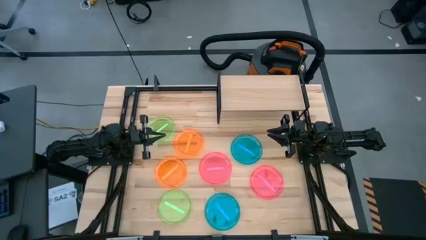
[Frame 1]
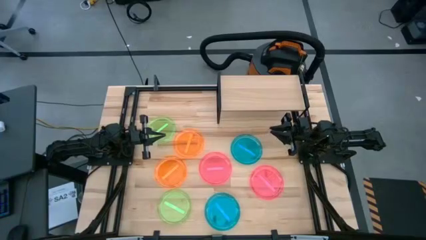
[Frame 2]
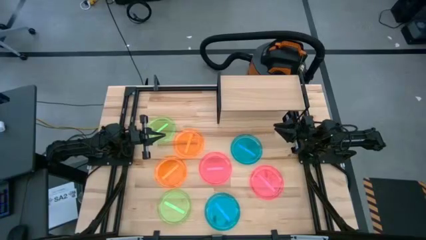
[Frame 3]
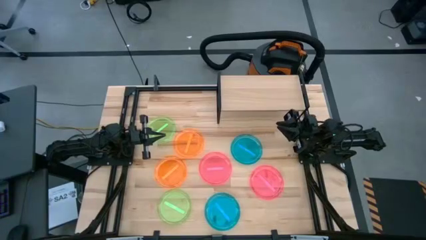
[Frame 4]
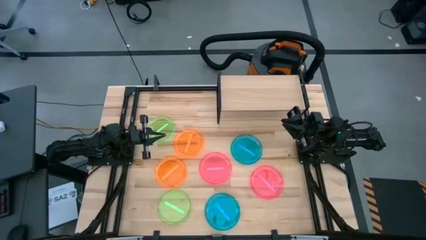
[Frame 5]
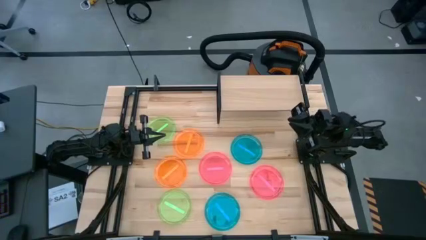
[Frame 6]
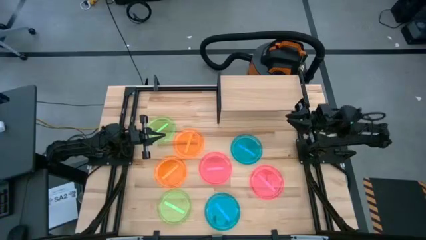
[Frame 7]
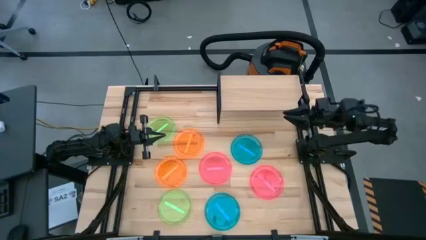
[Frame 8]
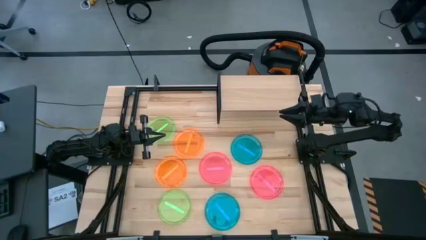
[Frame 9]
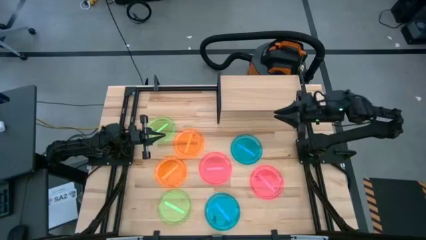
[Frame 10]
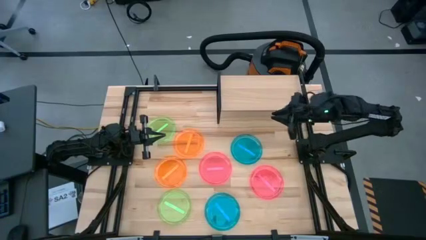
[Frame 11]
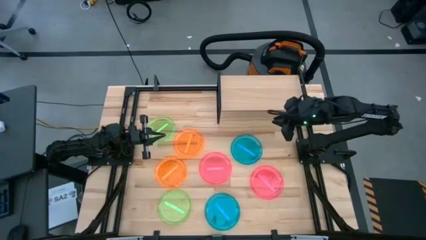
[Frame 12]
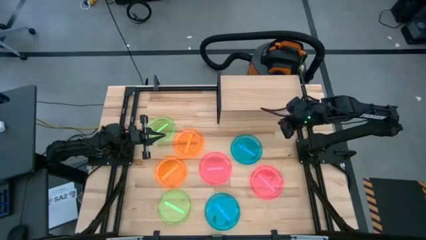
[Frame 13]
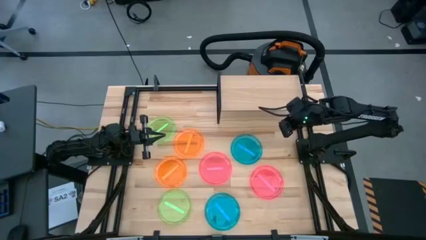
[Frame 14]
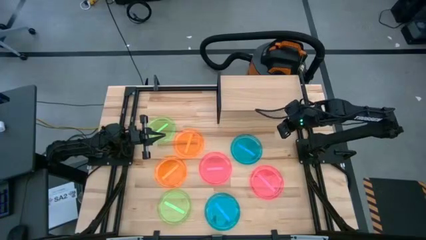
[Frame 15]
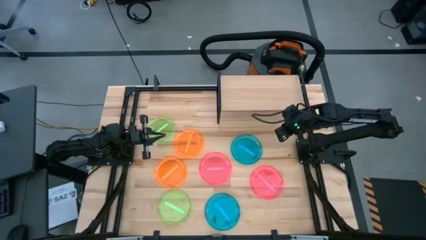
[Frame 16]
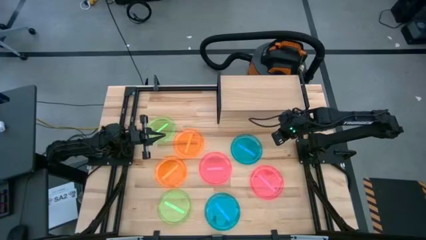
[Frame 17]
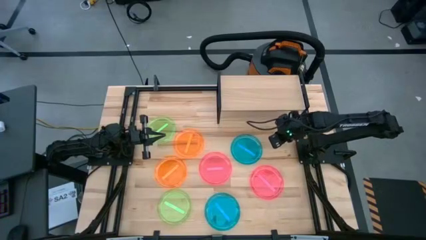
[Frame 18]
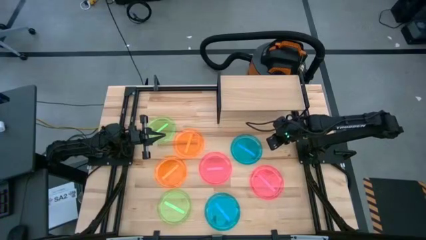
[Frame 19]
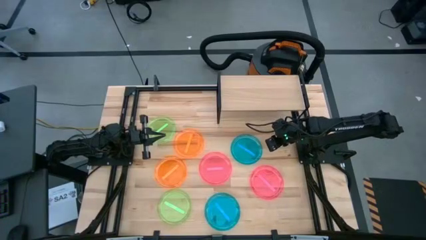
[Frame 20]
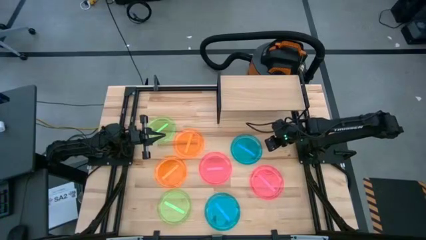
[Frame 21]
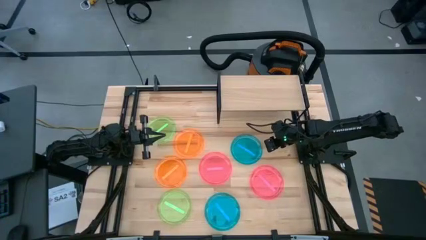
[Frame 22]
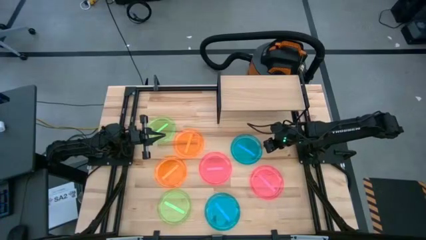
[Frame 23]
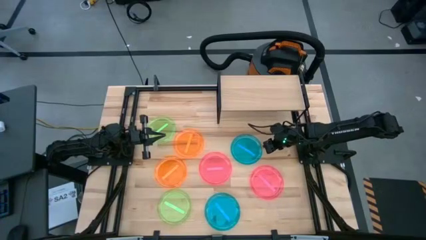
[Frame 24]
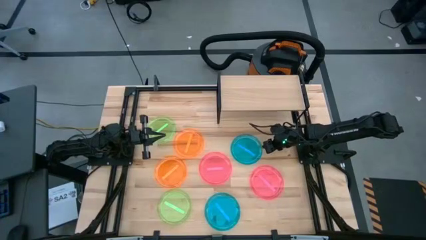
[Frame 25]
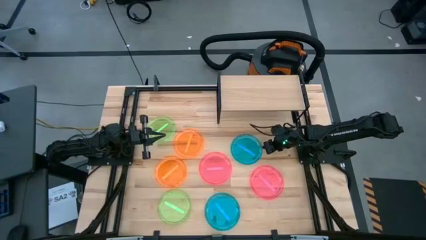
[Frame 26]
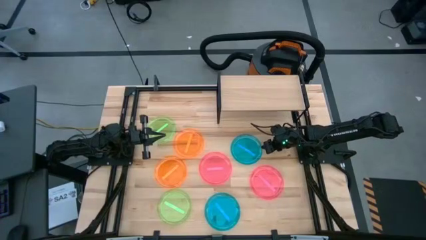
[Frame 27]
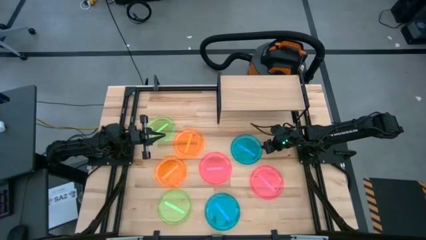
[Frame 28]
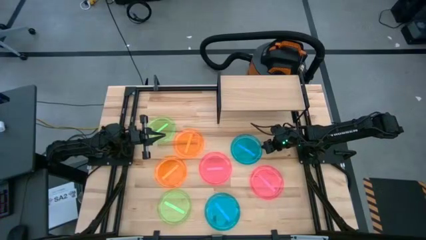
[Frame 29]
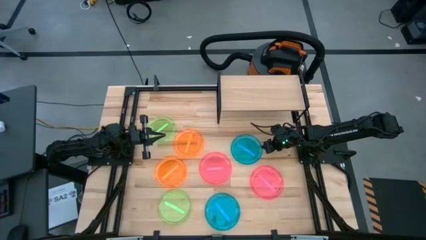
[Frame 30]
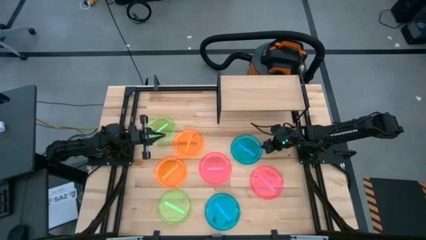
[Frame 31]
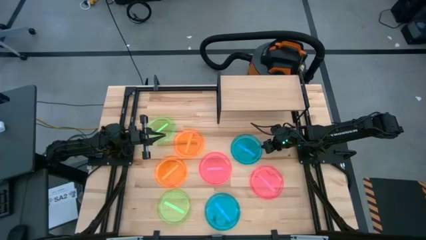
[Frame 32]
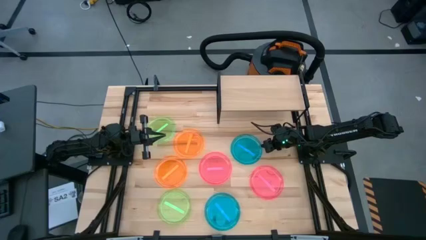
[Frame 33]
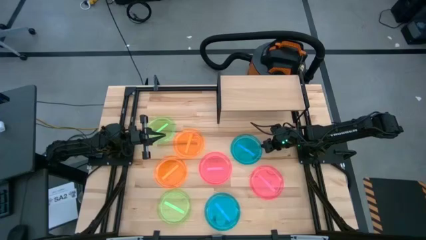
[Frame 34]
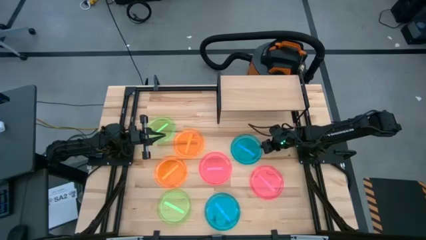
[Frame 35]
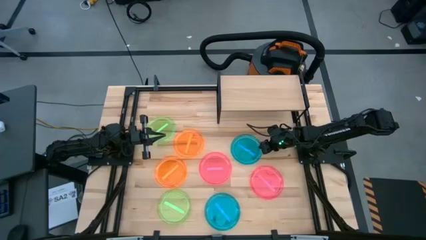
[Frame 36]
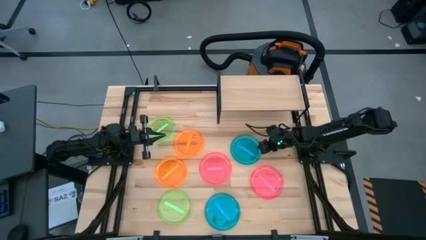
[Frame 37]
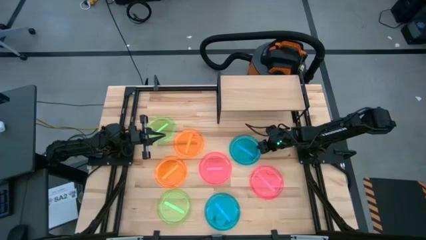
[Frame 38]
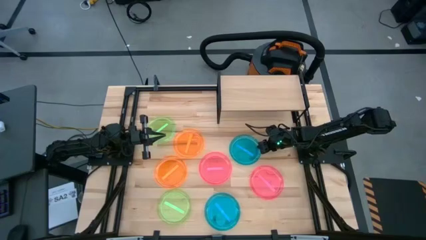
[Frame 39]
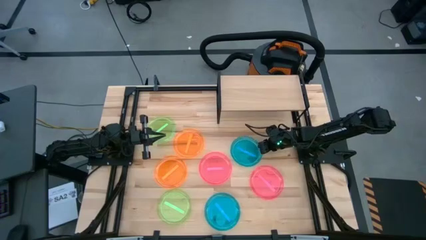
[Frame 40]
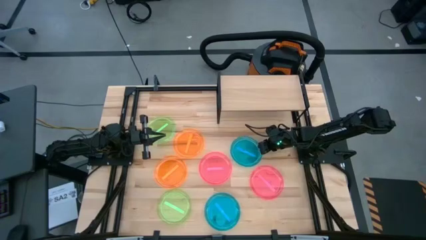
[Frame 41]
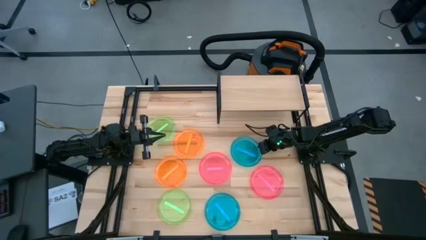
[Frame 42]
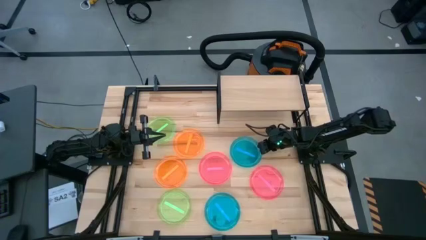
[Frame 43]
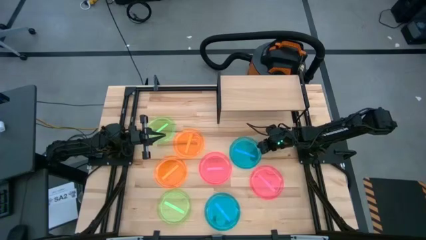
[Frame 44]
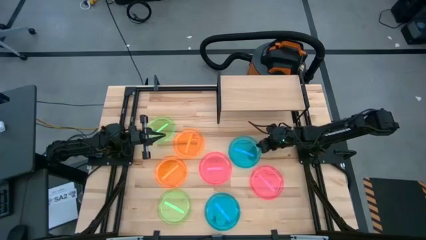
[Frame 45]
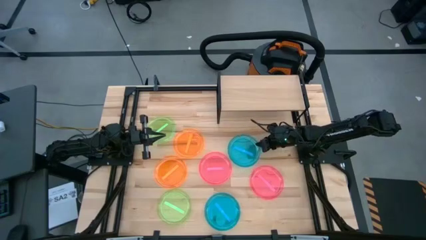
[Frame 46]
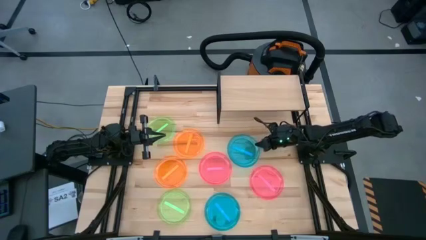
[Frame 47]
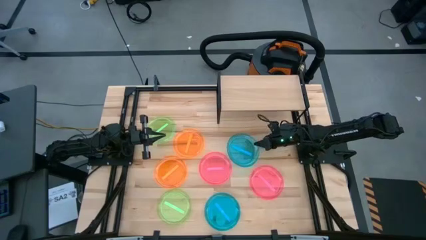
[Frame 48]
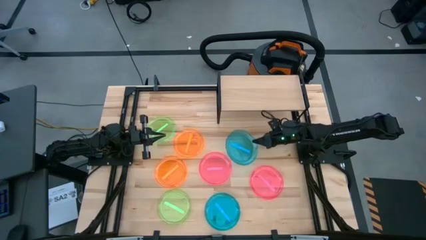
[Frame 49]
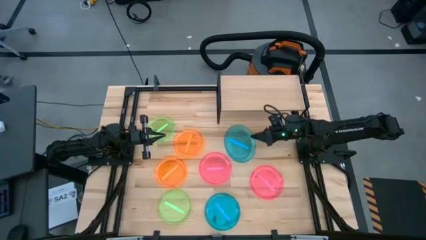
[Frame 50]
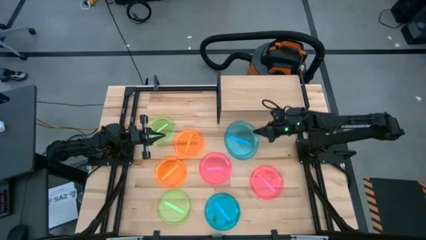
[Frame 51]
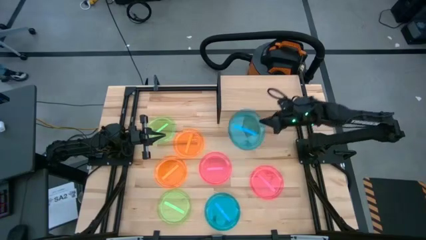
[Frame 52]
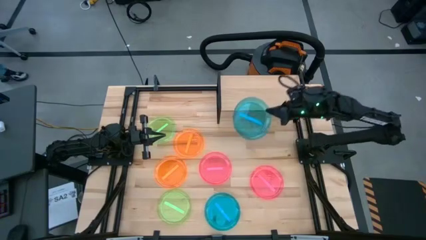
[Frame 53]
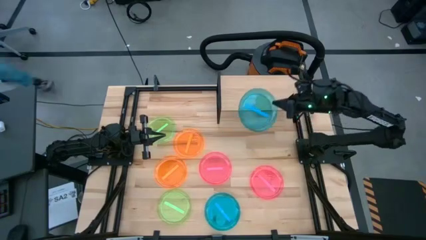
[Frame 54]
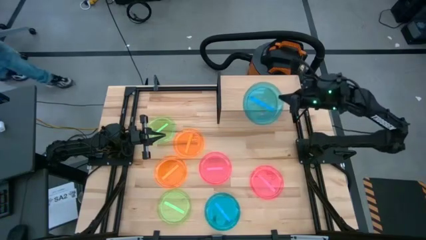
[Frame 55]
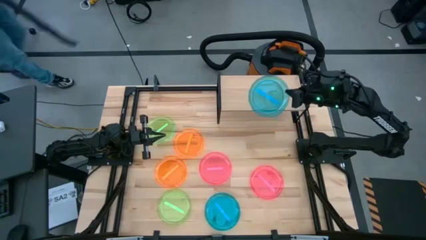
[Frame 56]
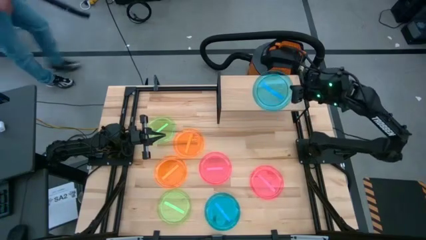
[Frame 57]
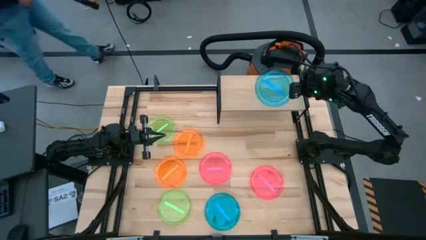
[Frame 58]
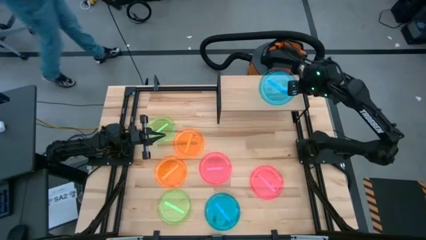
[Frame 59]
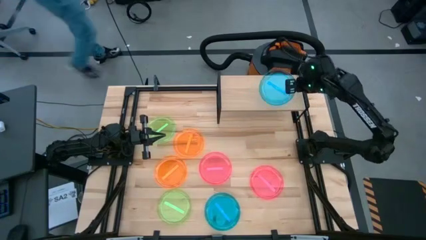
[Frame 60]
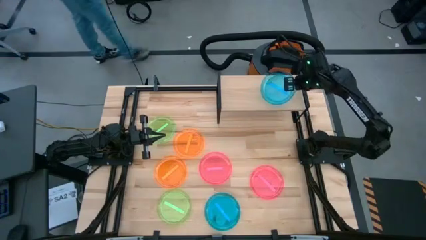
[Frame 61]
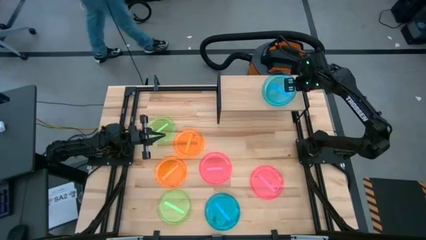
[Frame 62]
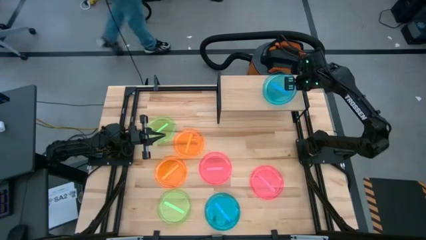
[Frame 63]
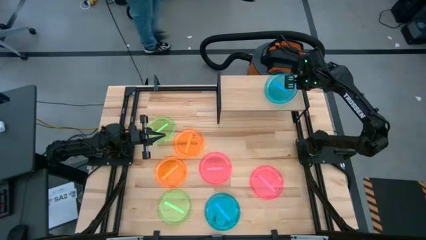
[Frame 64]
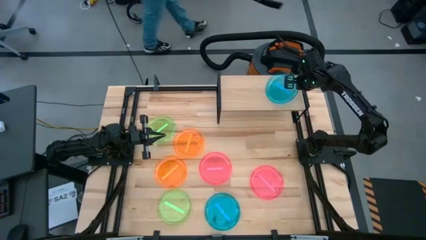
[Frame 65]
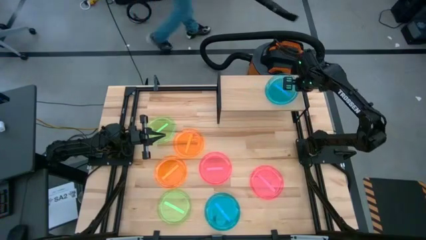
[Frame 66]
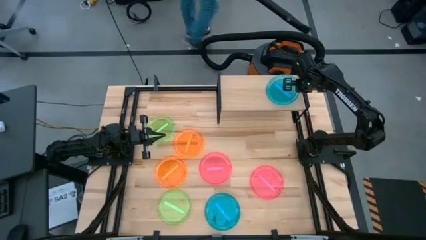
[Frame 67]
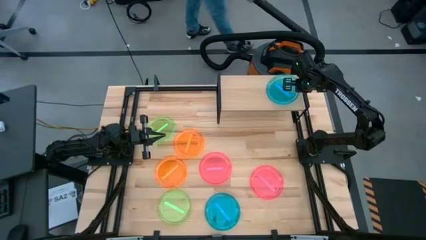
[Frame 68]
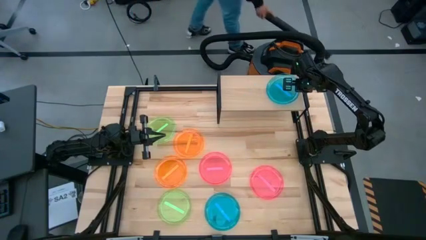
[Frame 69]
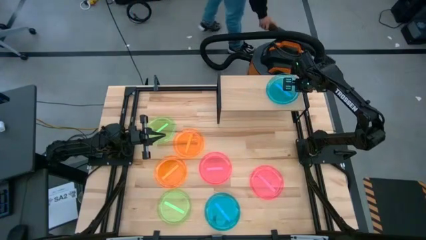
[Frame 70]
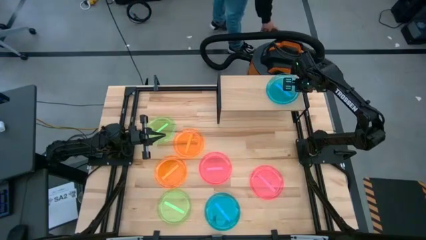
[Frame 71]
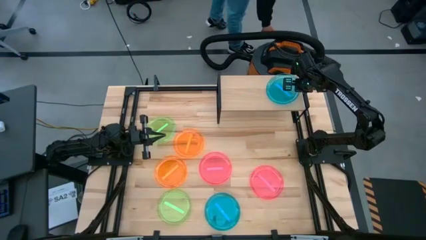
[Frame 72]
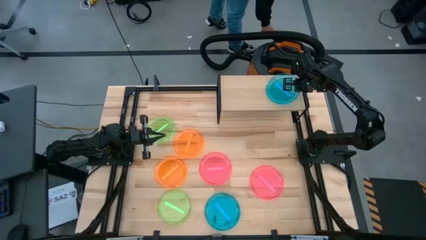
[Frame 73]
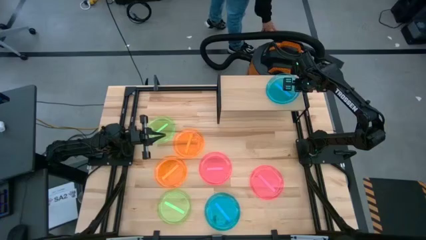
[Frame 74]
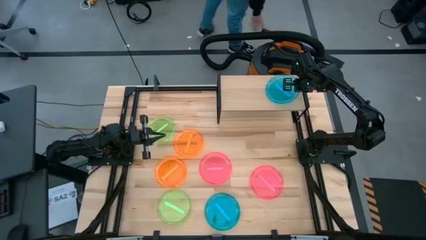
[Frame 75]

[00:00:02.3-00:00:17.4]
Task: Place and stack plates onto a shelf
Put the top blue plate on the shelf
